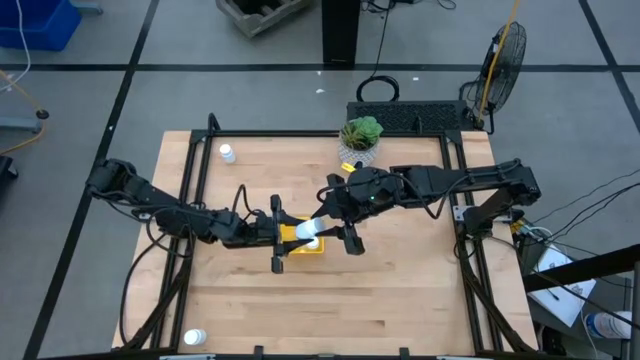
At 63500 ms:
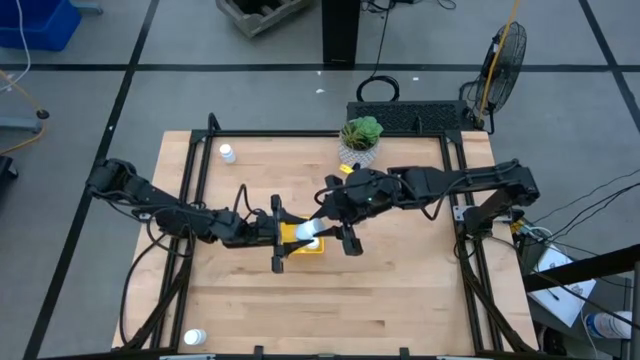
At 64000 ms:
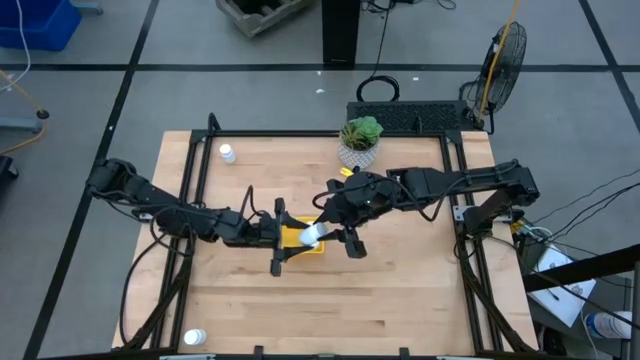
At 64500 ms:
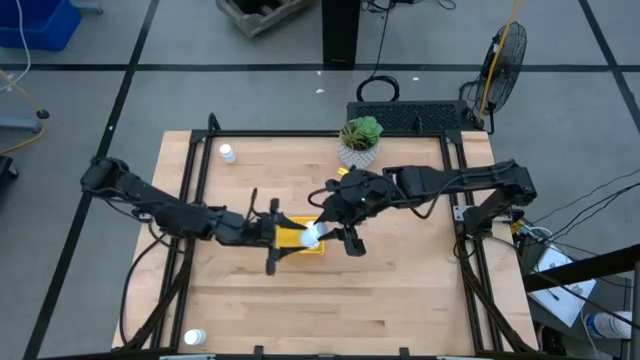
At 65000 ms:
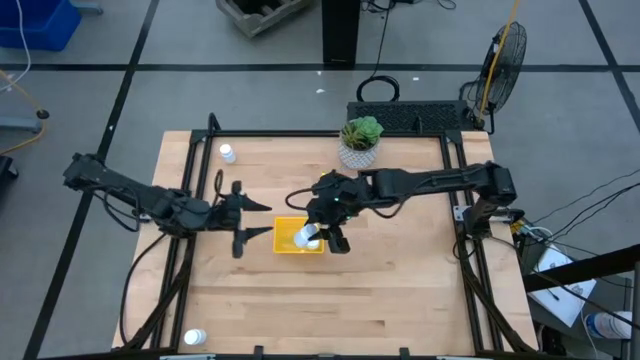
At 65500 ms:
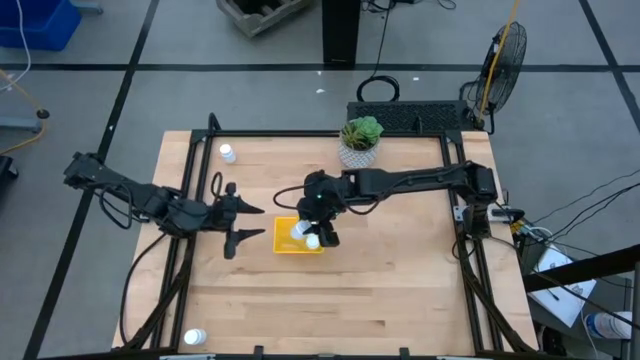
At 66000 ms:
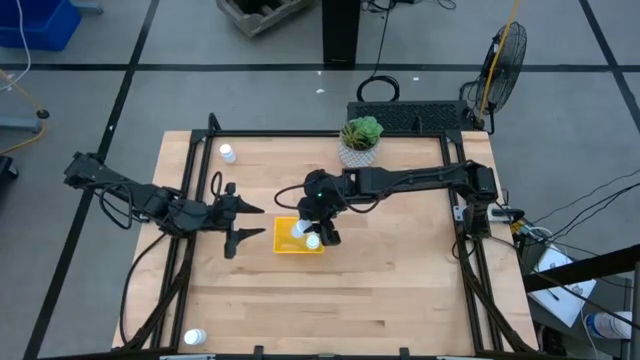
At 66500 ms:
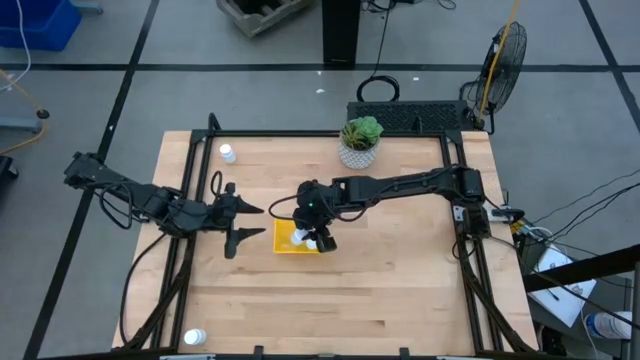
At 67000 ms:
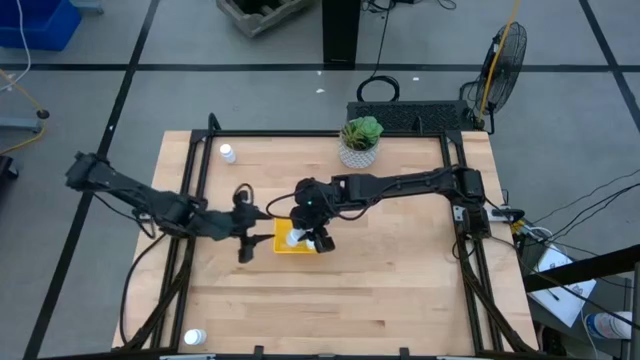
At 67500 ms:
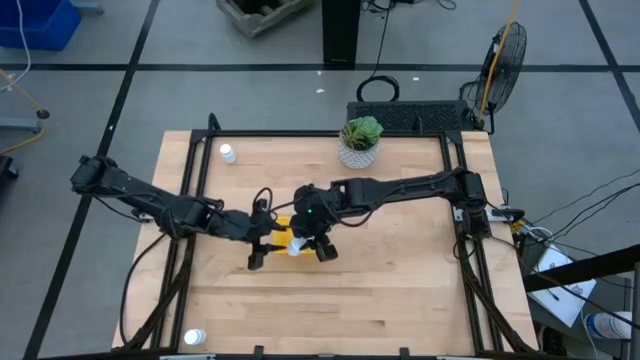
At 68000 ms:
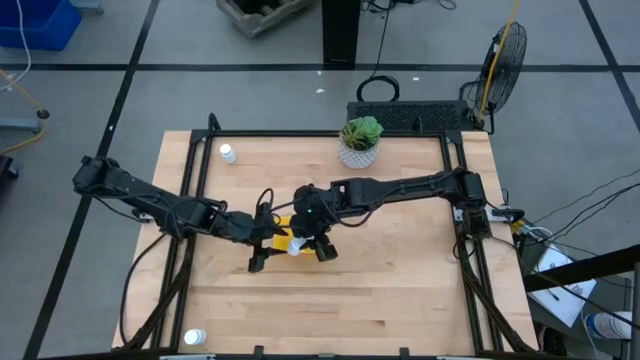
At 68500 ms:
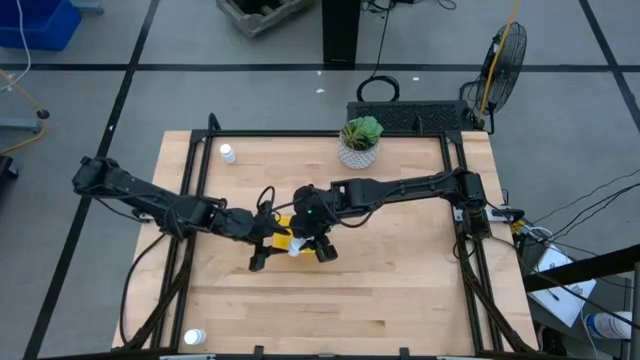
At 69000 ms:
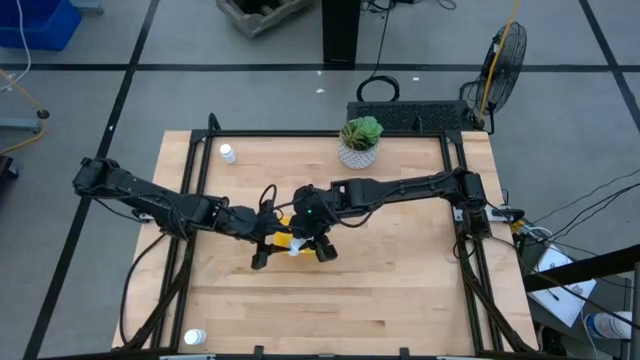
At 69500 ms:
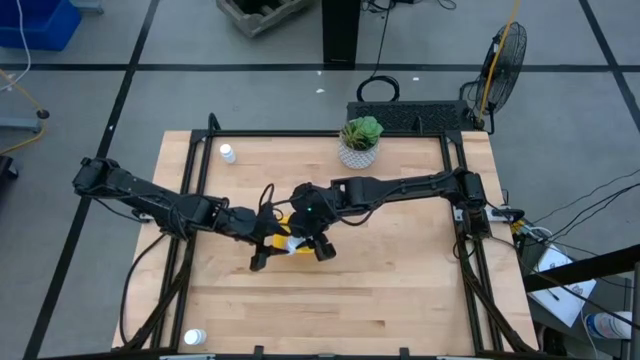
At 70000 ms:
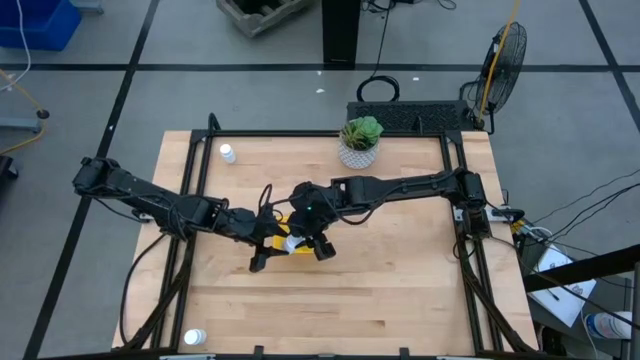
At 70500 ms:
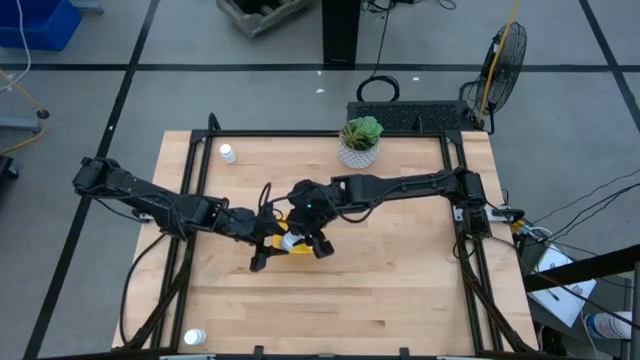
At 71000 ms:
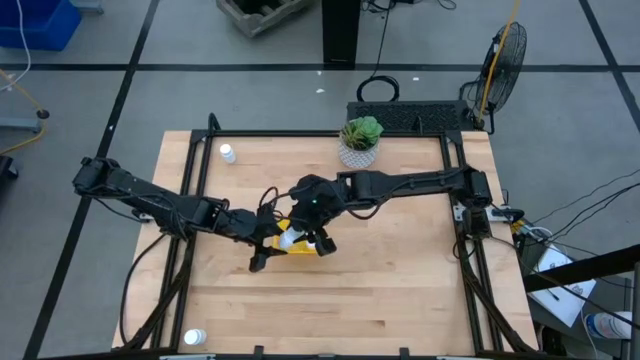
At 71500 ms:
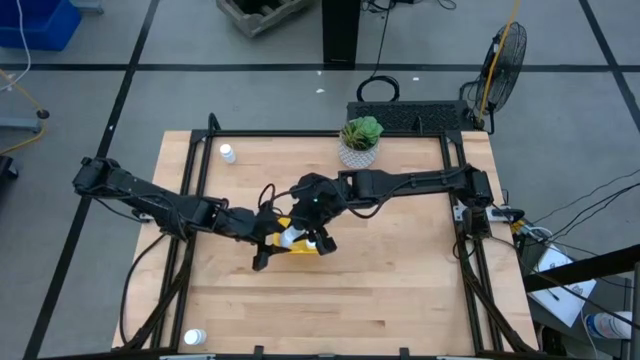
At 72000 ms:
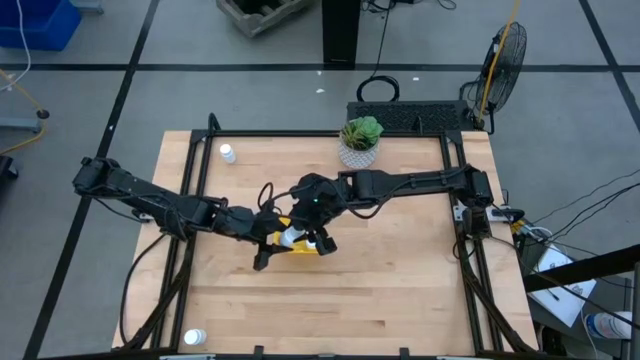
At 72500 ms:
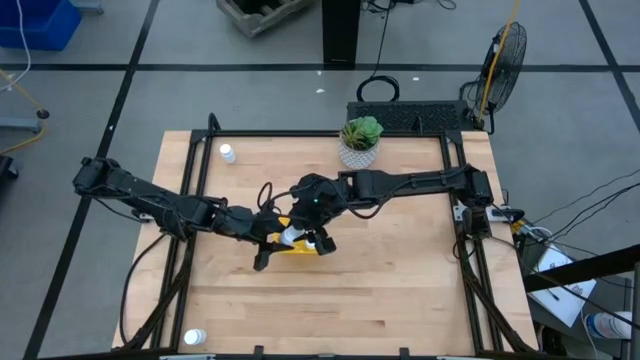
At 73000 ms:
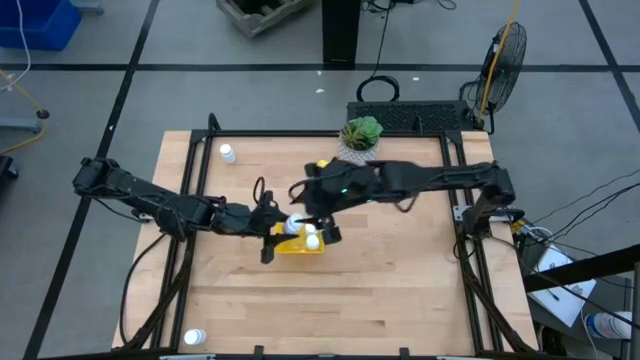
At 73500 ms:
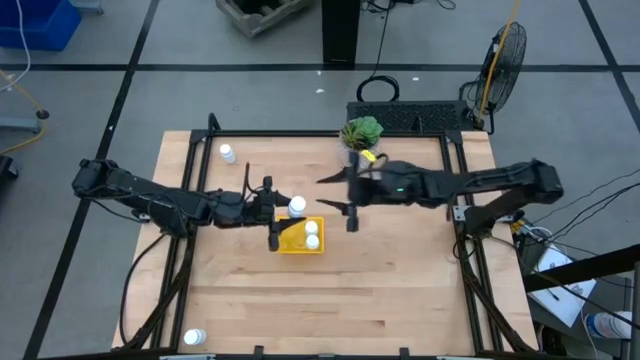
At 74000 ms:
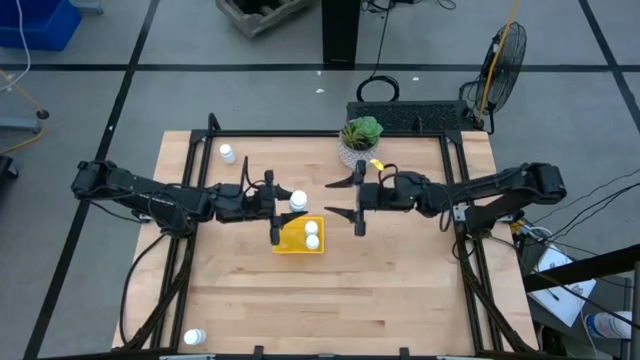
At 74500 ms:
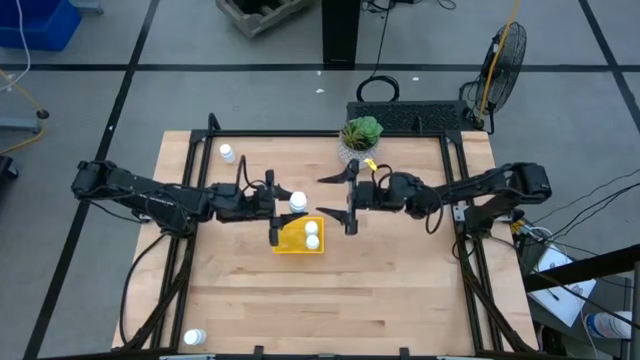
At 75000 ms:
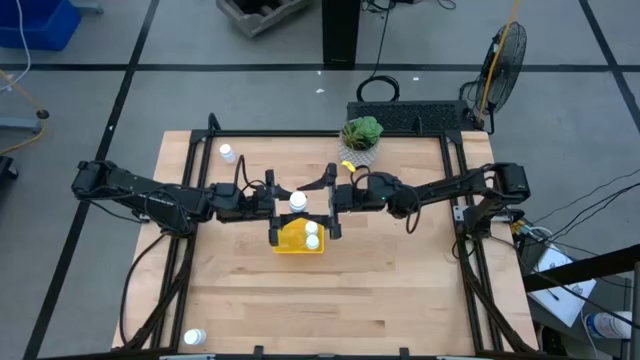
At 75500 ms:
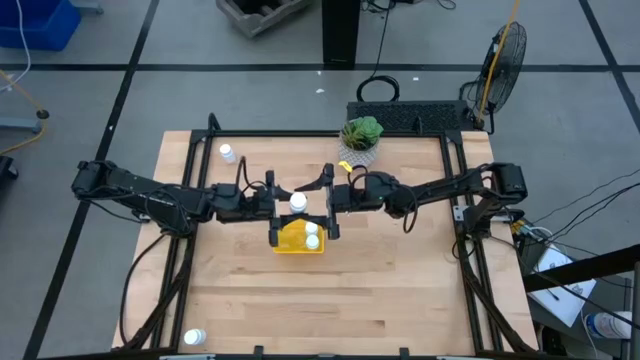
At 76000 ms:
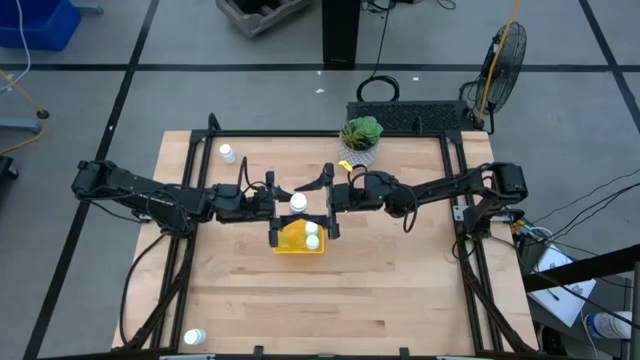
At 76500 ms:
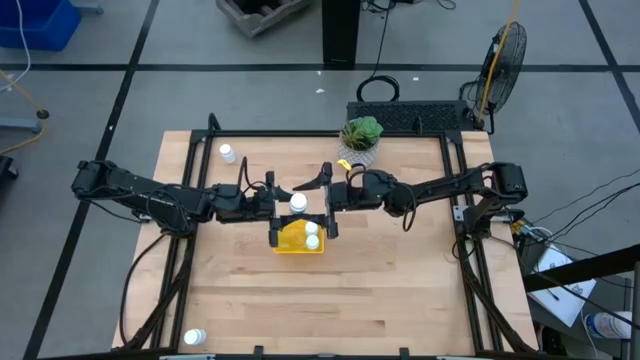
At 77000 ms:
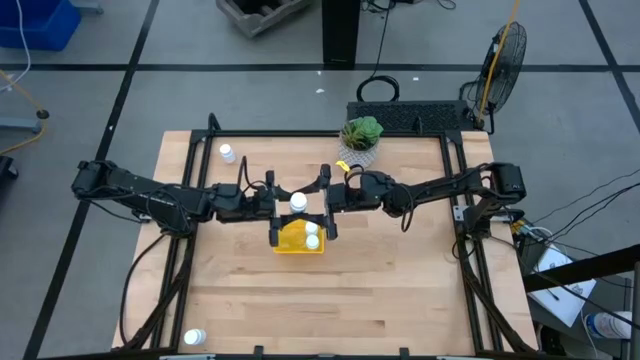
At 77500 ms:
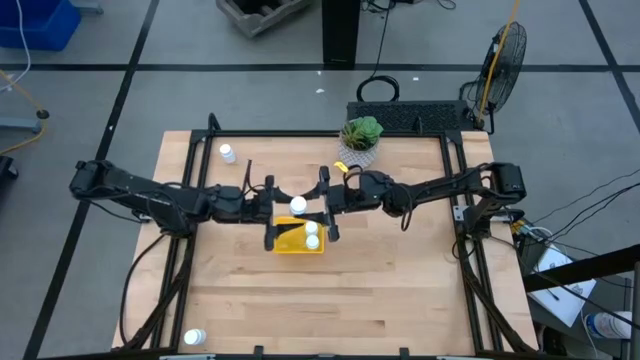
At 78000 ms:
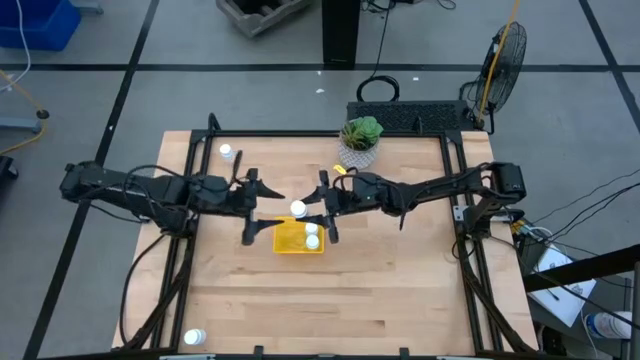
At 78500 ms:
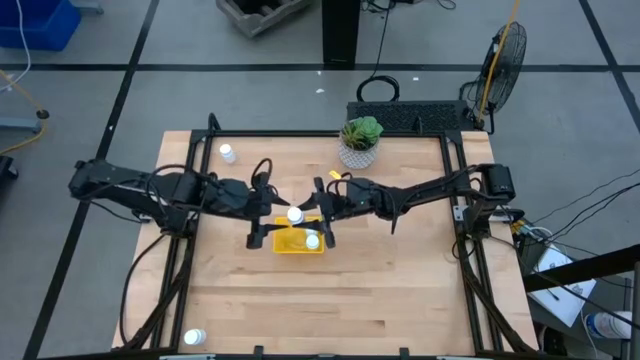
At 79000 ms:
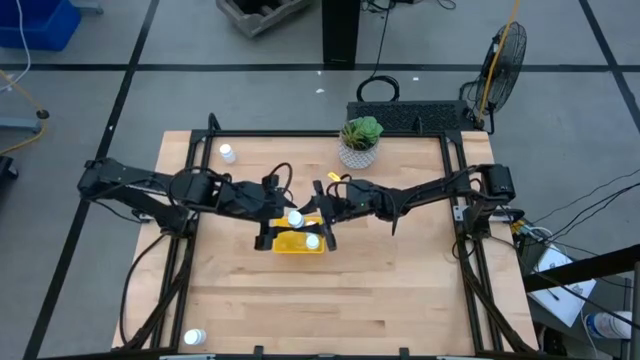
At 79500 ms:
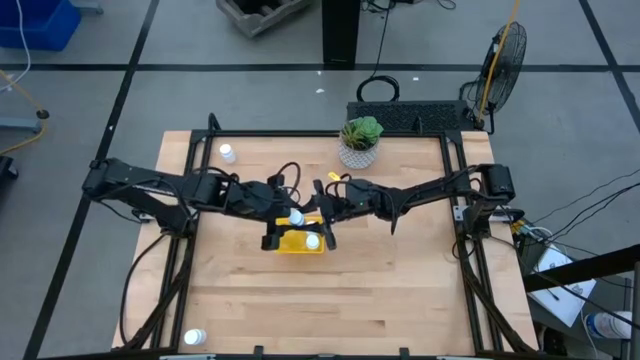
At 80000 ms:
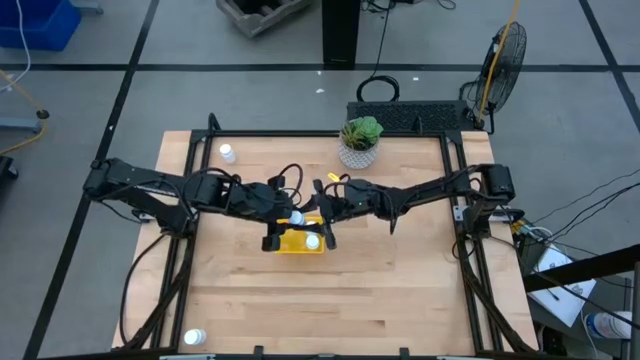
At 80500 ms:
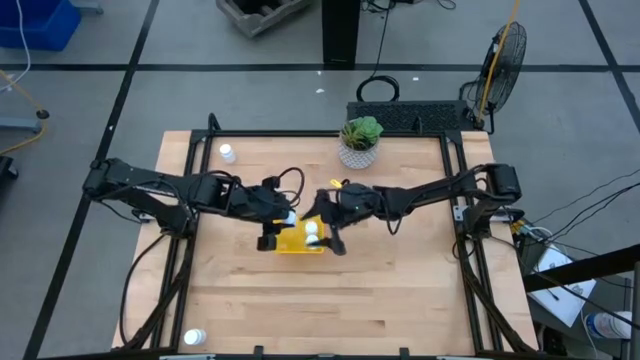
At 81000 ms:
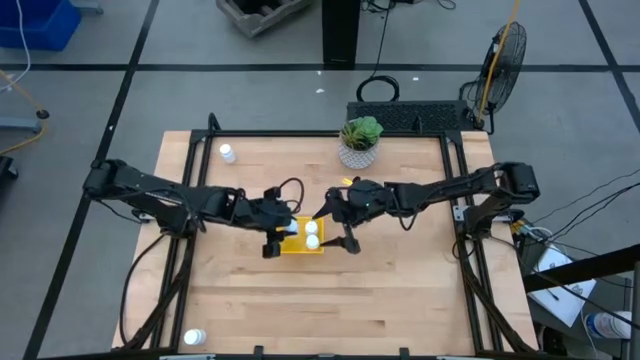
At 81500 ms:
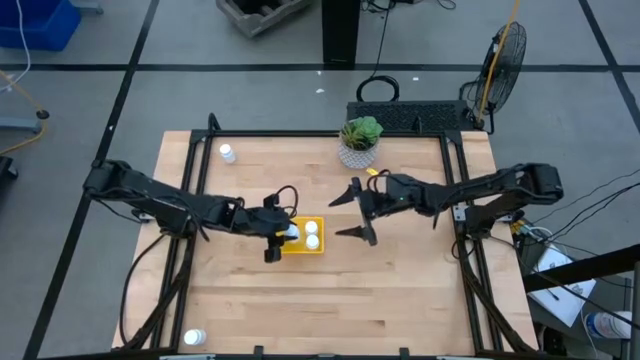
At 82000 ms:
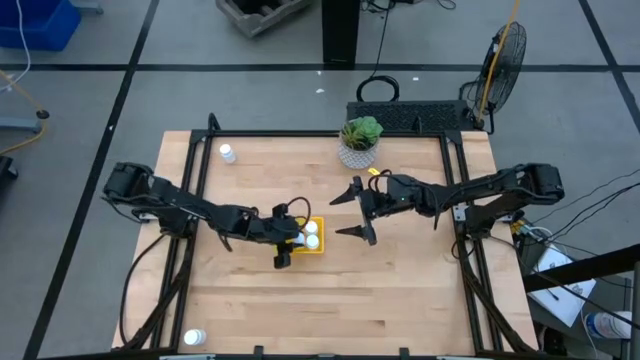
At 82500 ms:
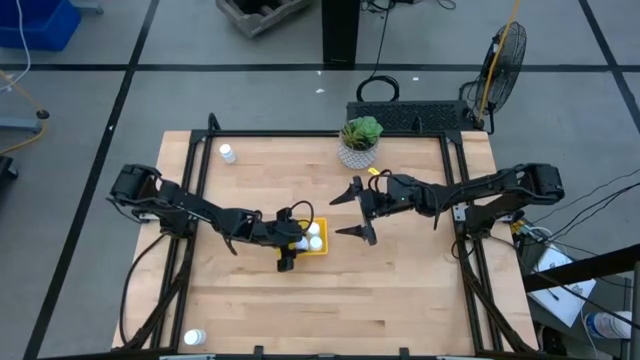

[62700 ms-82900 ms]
Task: Pick and place pill bottles into a basket
Put the white pill bottle into the yellow bin
